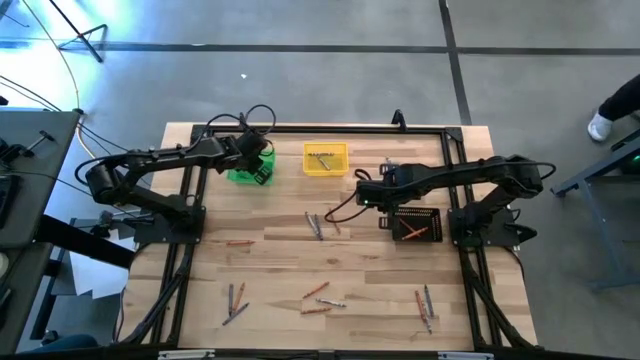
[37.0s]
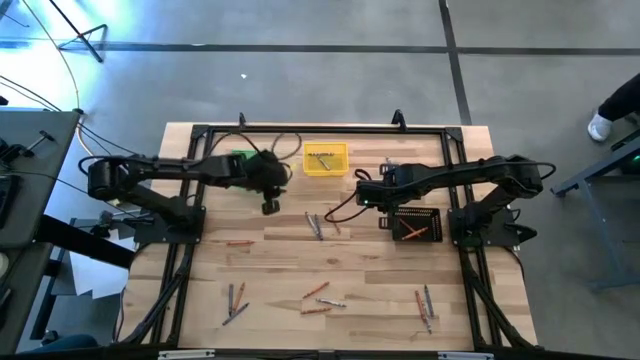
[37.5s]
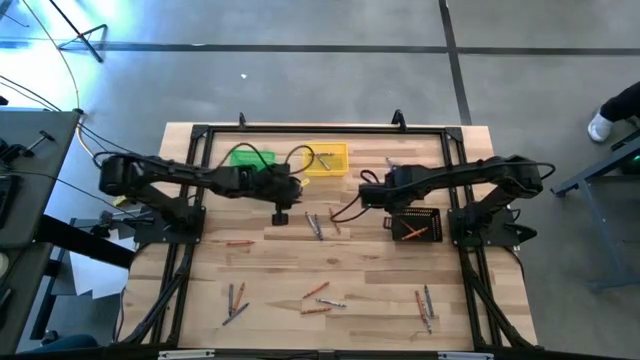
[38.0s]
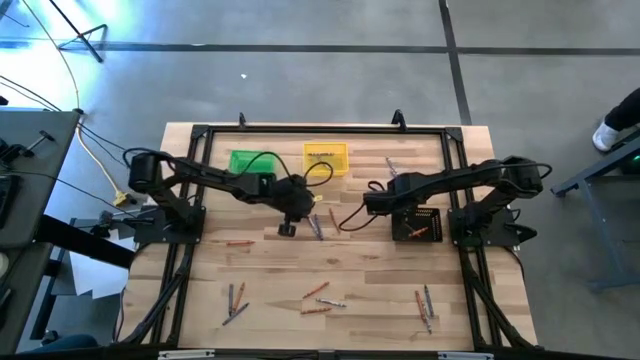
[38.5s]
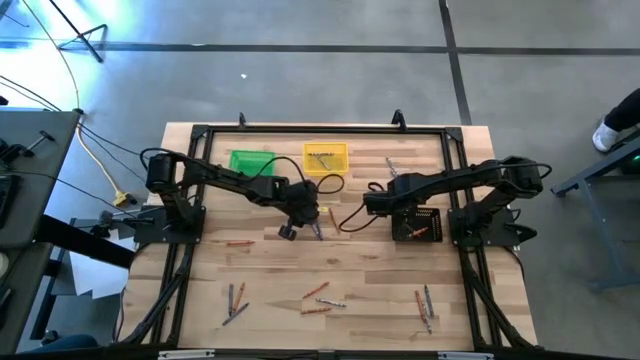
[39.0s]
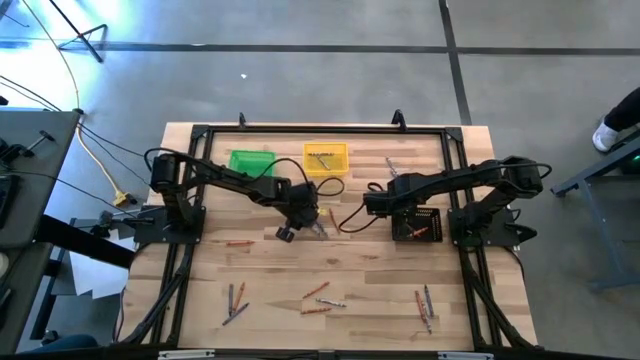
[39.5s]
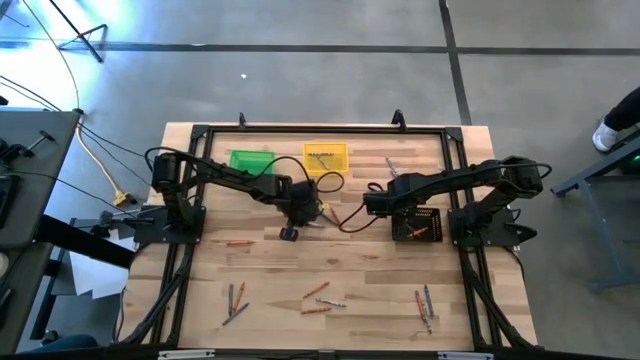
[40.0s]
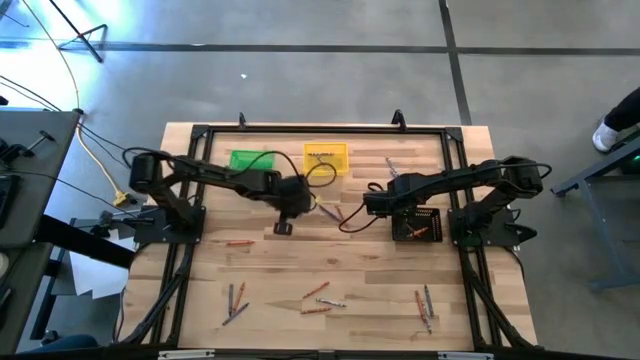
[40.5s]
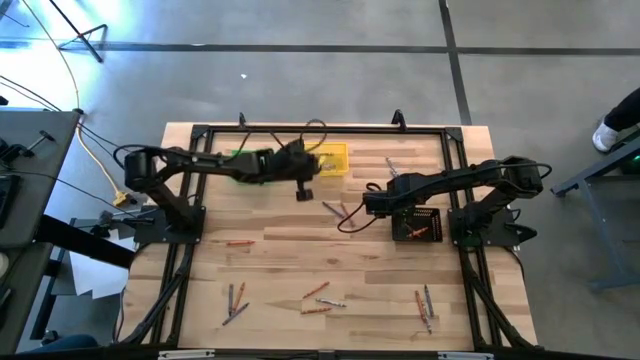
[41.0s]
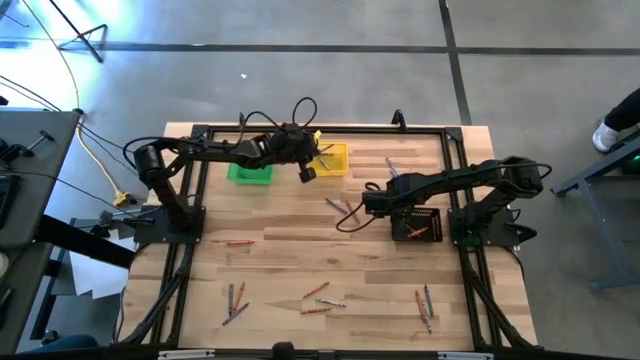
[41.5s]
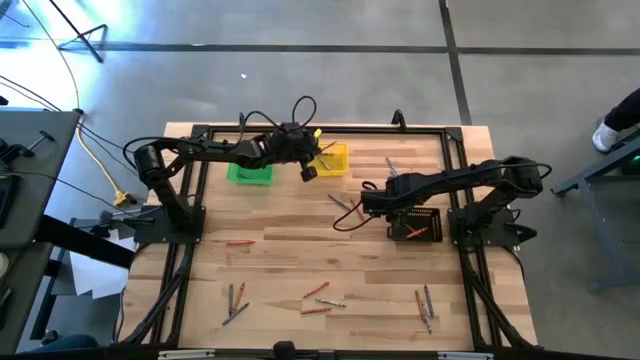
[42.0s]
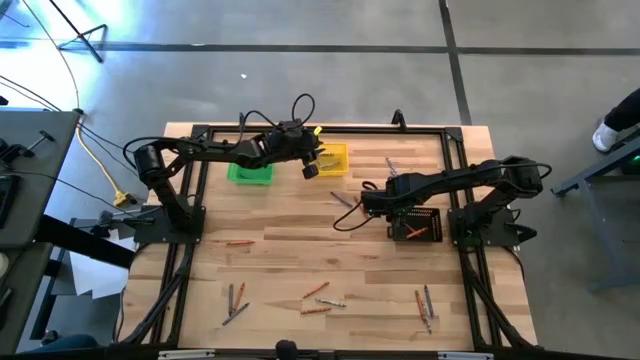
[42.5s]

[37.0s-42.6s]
Task: Sort crayons
Put the gray crayon into the yellow bin

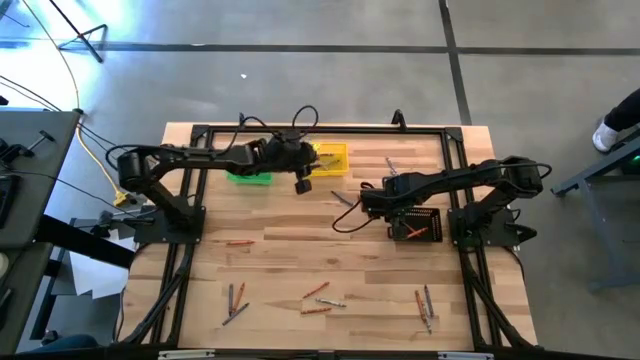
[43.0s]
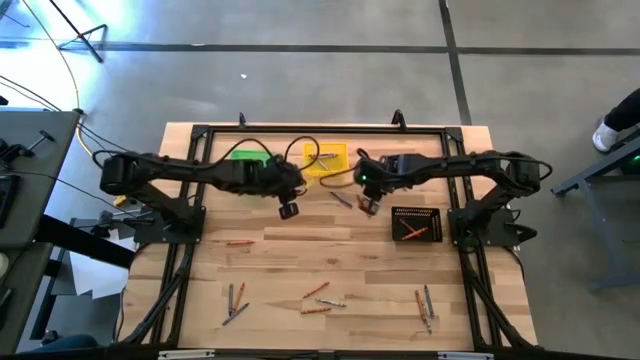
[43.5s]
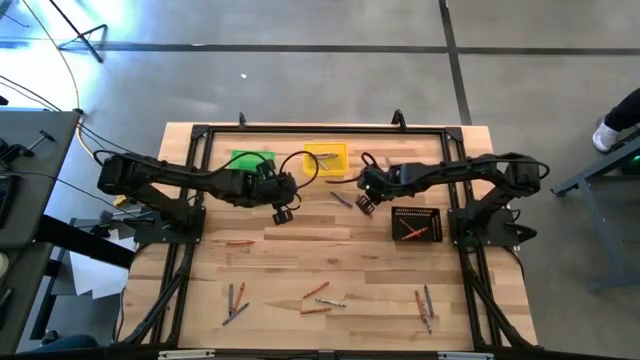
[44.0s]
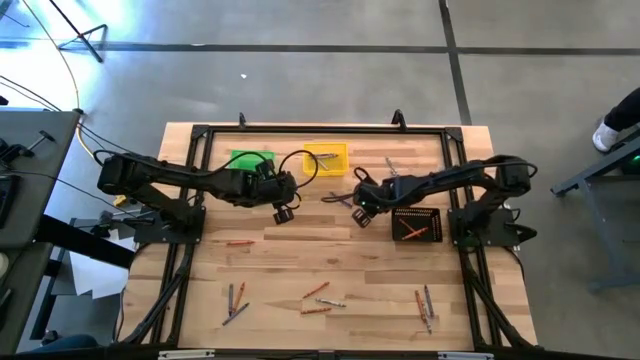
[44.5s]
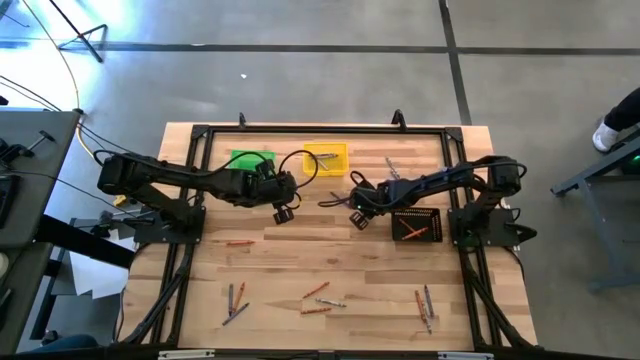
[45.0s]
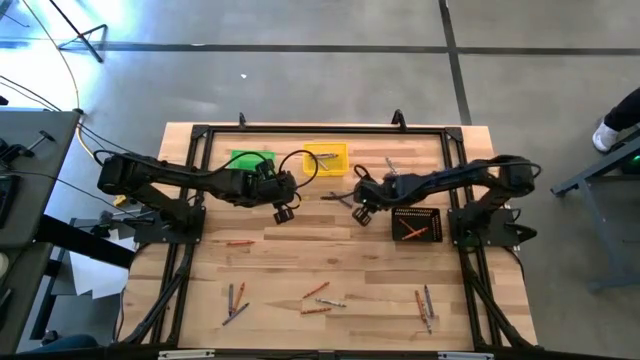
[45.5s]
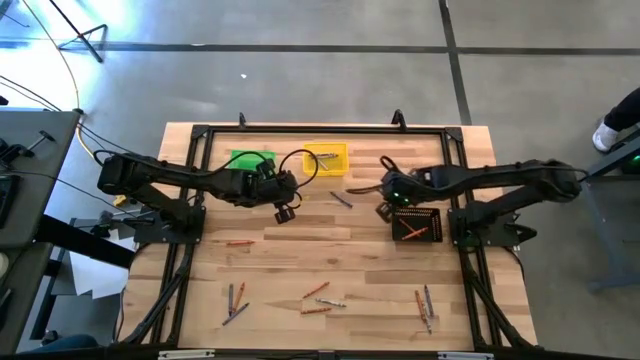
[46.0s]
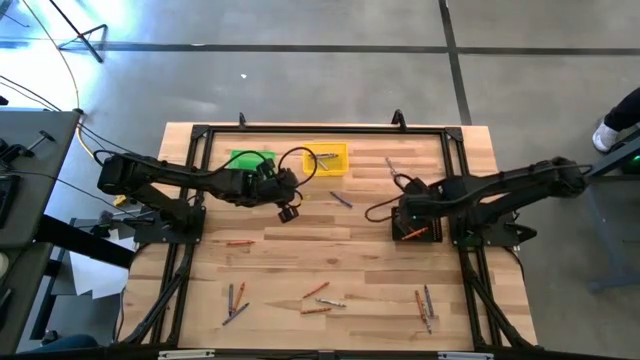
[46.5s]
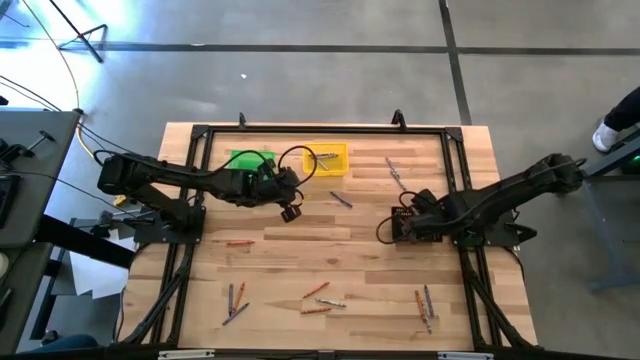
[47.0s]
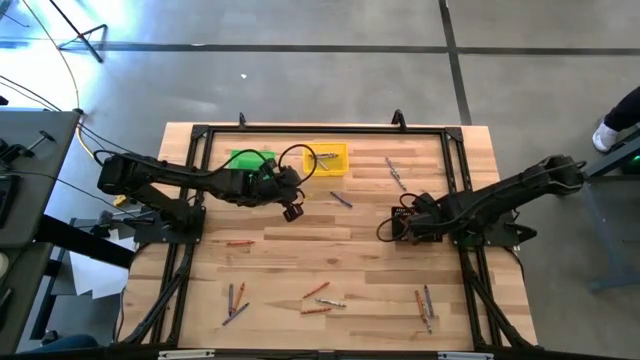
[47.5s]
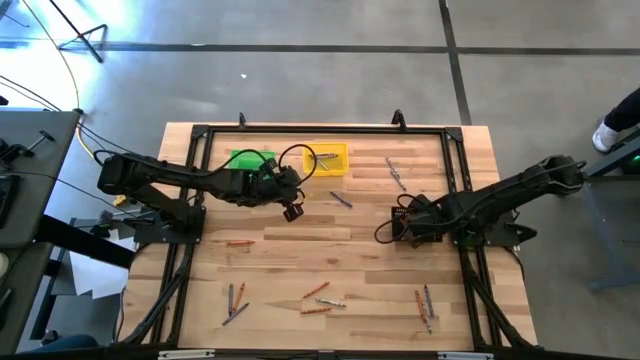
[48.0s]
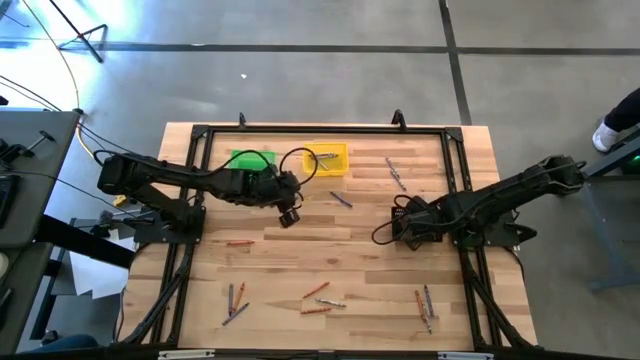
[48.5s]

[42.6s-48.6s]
Put the orange crayon into the black bin

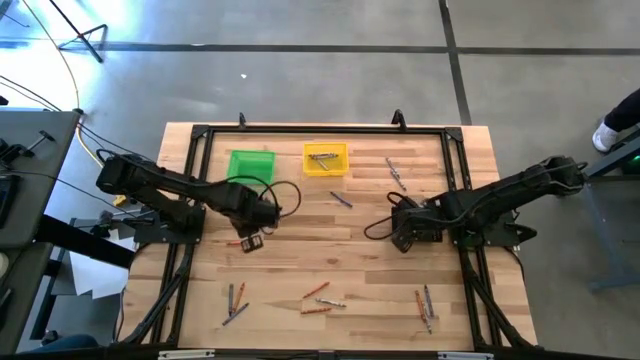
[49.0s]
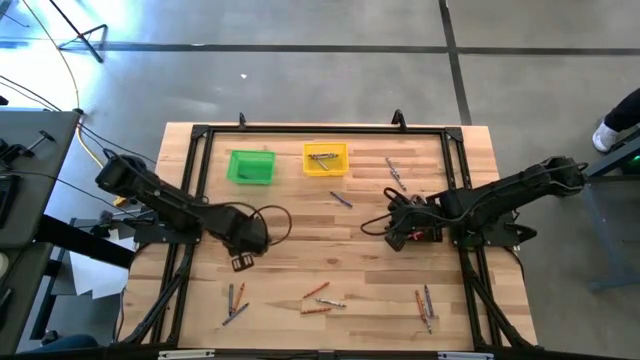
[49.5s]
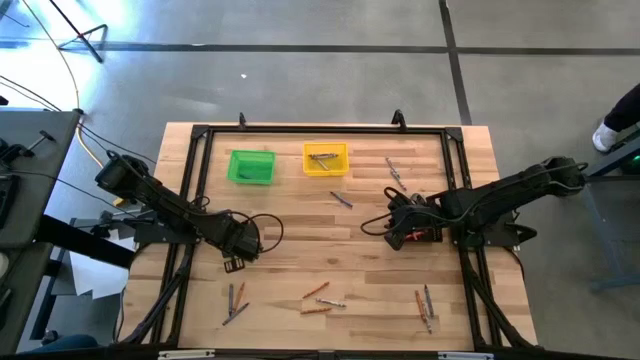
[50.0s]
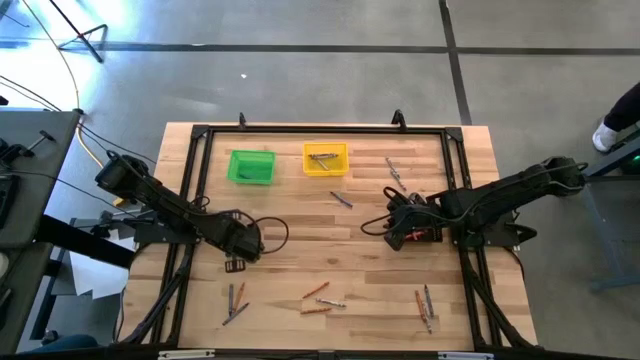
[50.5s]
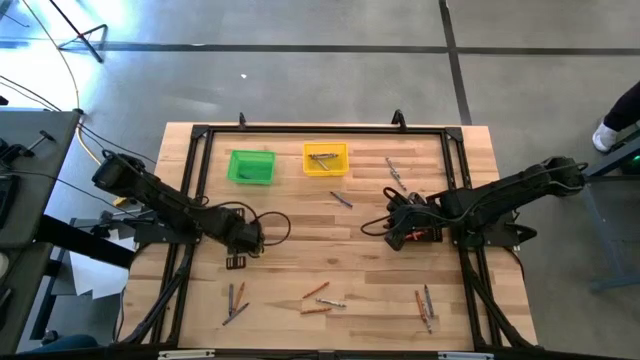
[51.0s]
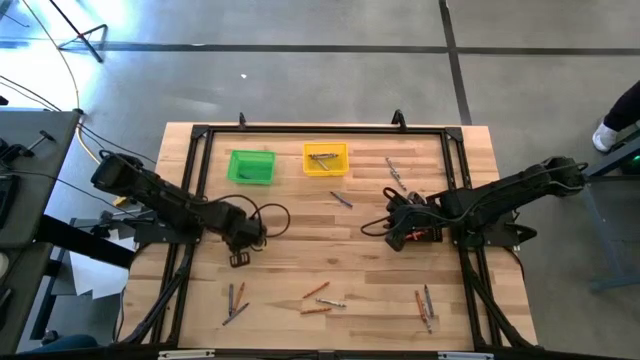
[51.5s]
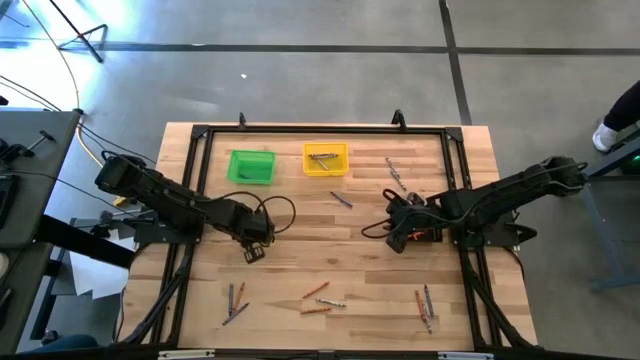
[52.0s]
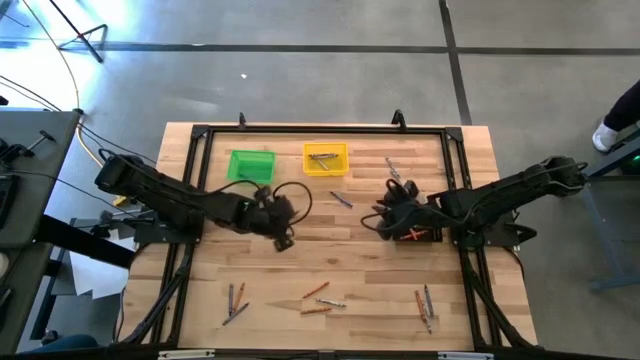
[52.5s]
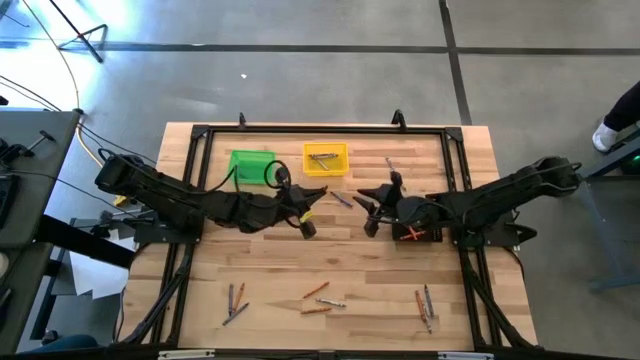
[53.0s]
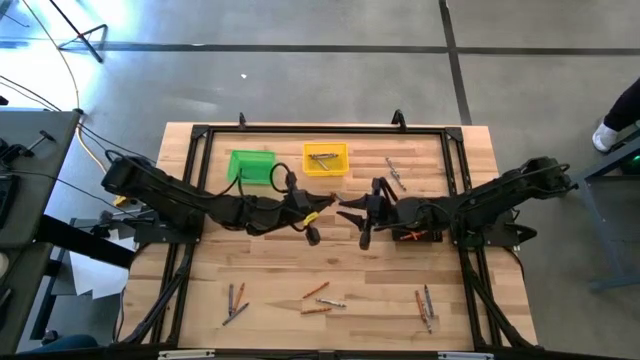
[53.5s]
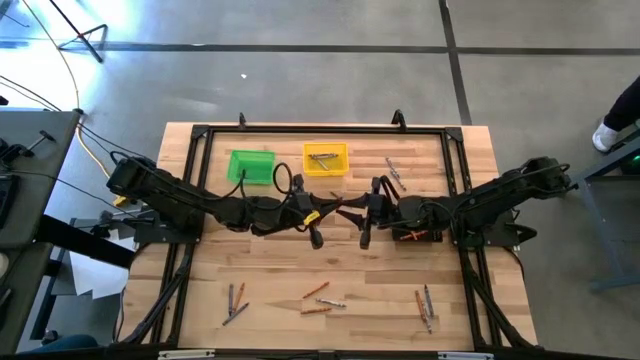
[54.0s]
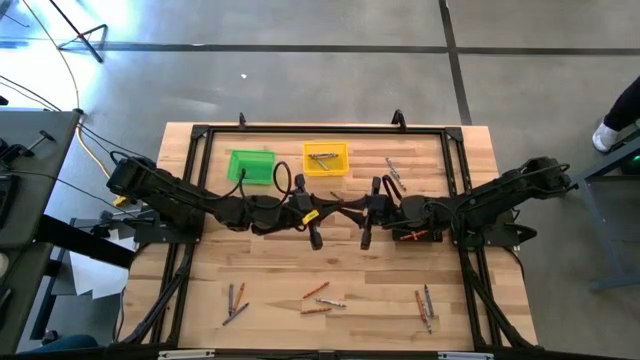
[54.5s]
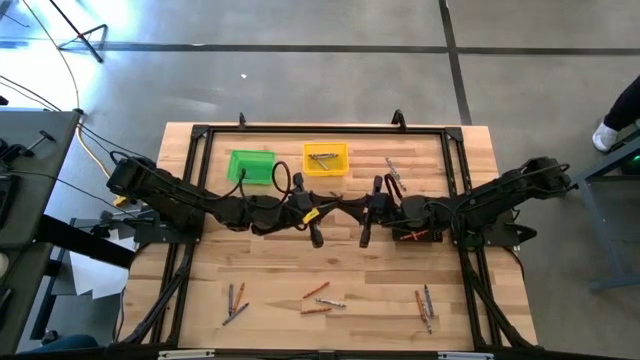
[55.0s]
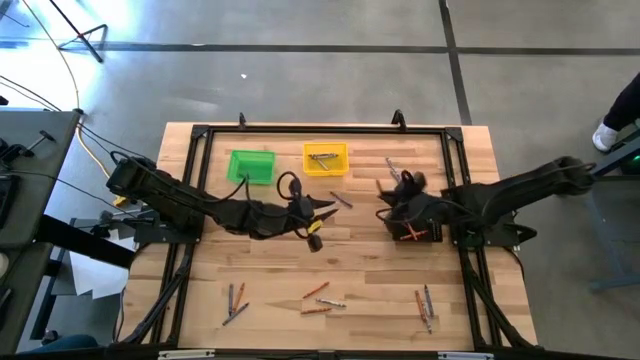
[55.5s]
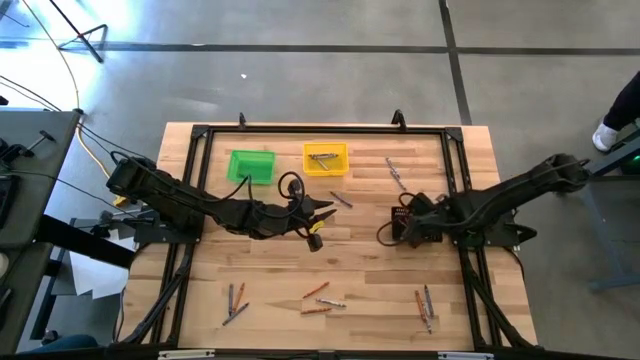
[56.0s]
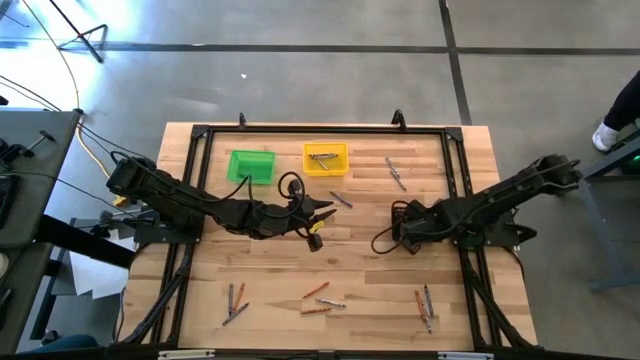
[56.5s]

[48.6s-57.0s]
Put the orange crayon into the black bin

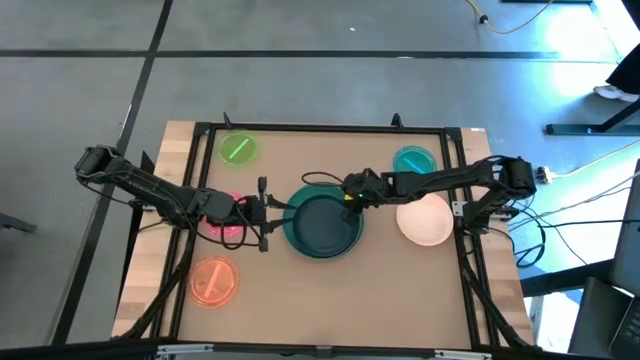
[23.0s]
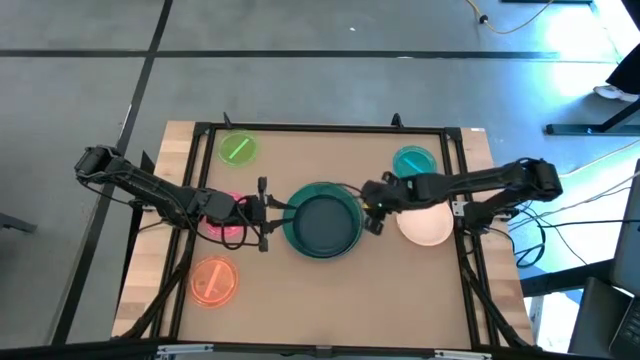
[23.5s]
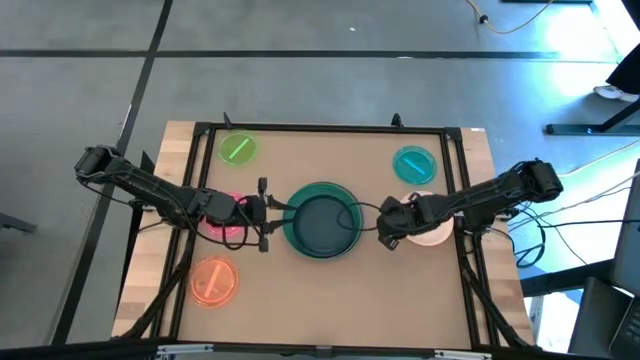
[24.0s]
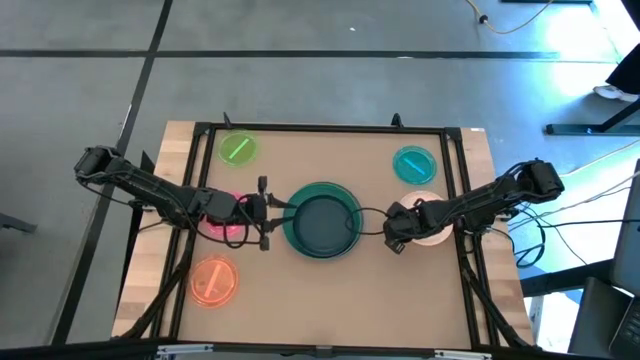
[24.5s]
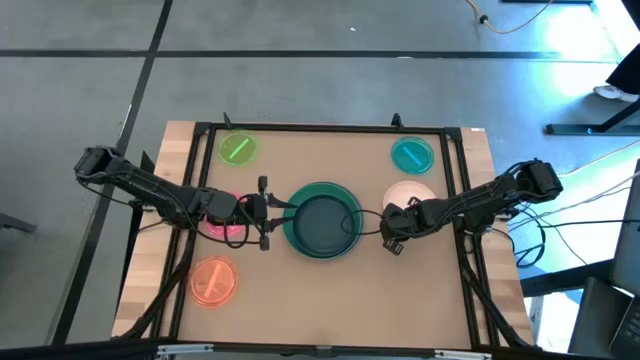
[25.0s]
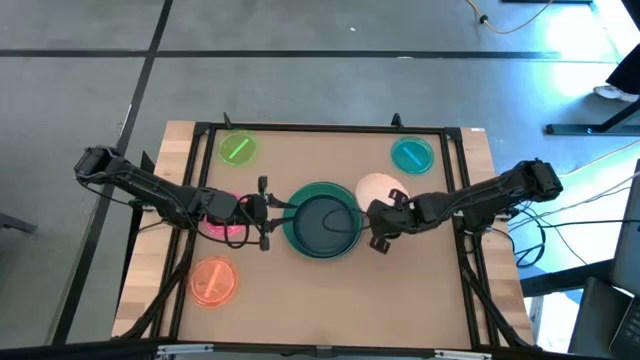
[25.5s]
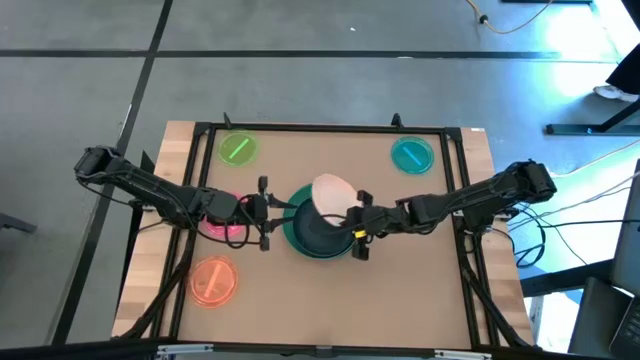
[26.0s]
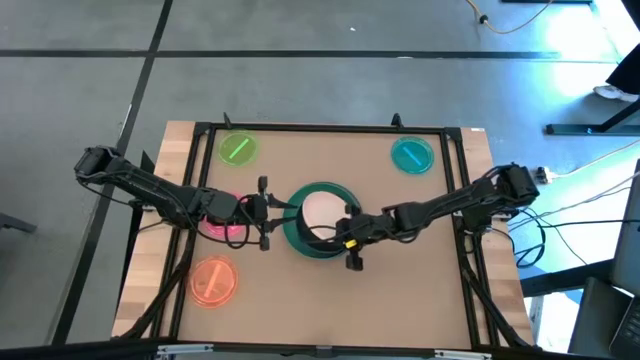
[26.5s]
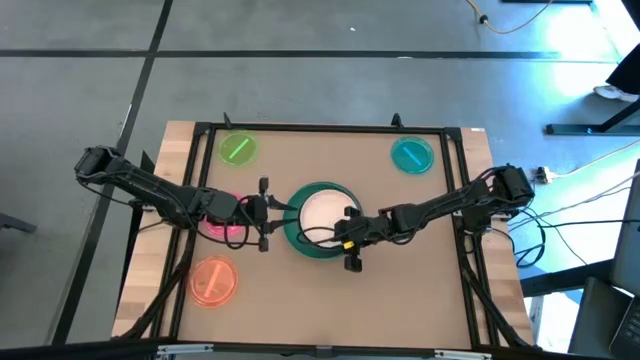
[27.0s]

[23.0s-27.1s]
Task: Stack plastic plates
Stack the light orange plate on top of the black plate
